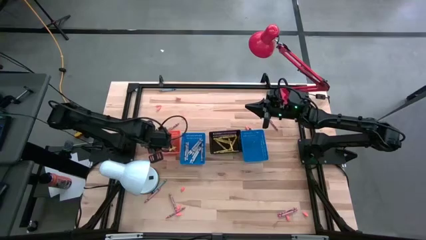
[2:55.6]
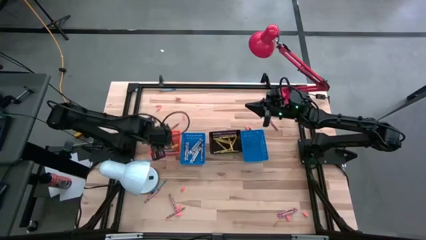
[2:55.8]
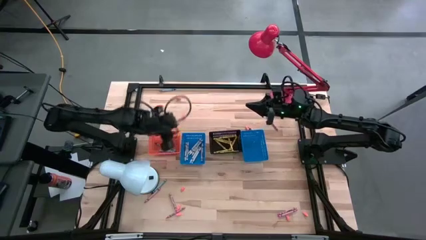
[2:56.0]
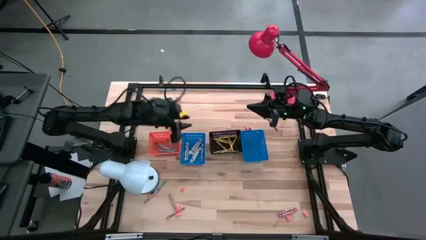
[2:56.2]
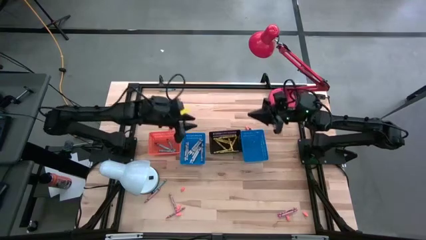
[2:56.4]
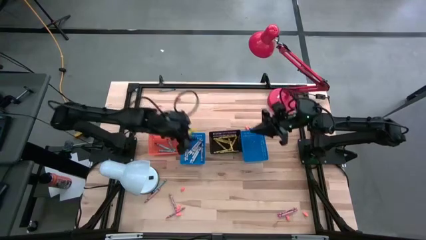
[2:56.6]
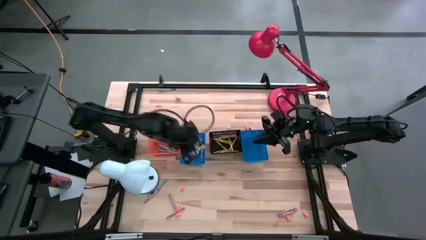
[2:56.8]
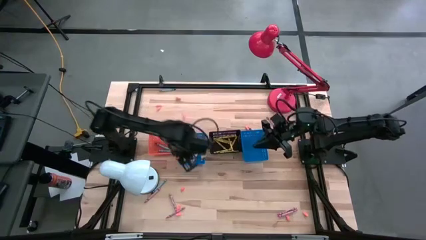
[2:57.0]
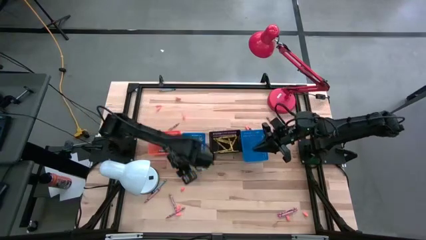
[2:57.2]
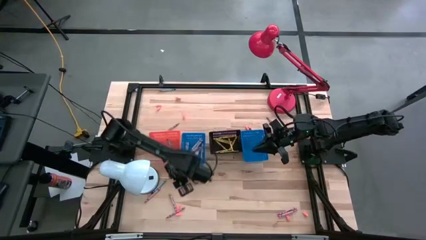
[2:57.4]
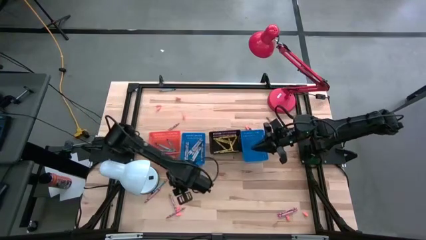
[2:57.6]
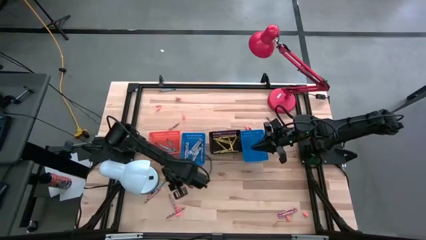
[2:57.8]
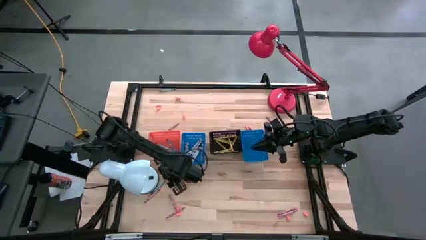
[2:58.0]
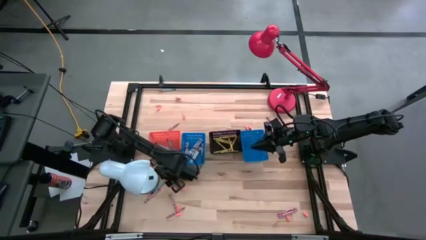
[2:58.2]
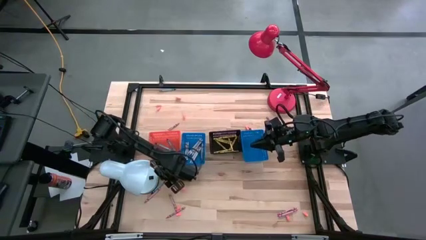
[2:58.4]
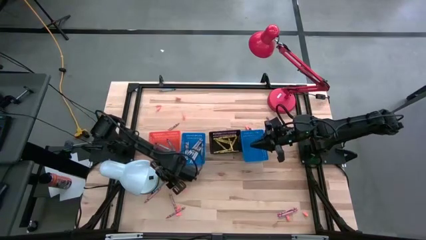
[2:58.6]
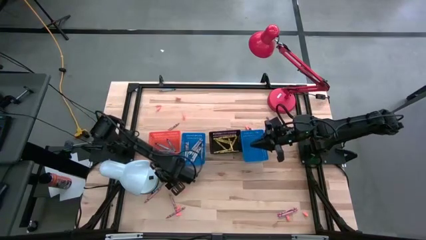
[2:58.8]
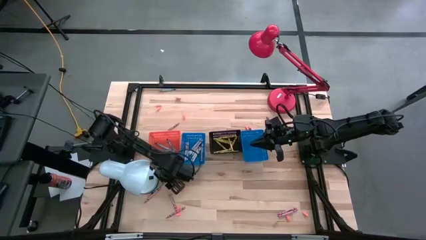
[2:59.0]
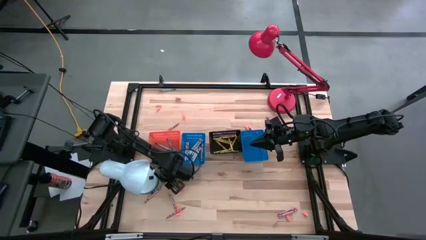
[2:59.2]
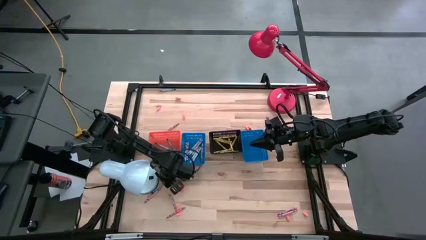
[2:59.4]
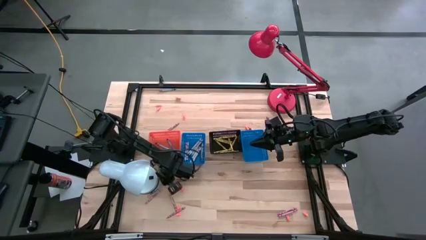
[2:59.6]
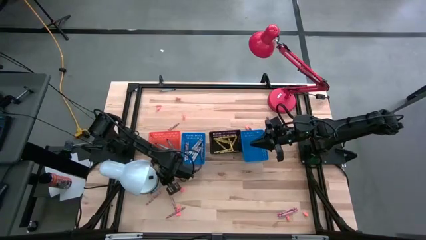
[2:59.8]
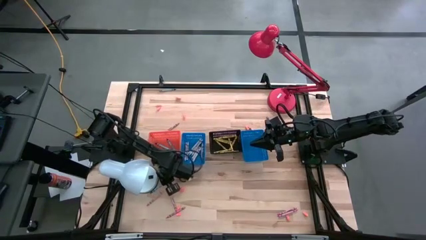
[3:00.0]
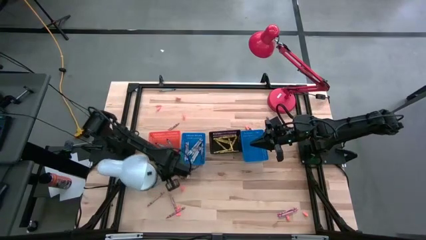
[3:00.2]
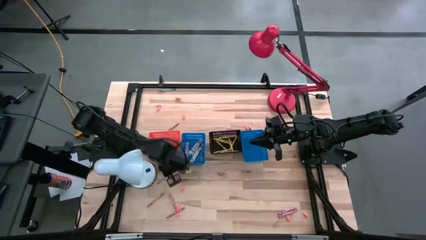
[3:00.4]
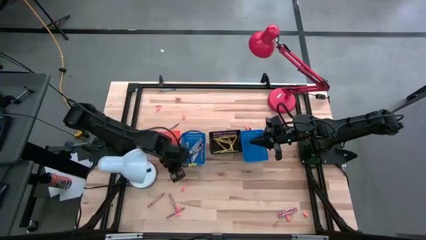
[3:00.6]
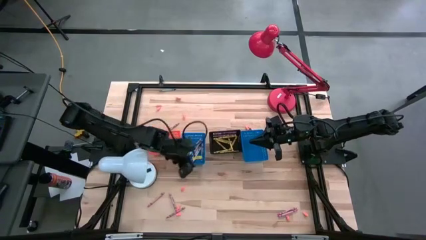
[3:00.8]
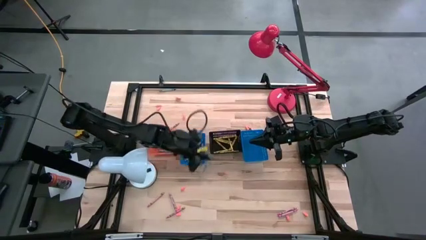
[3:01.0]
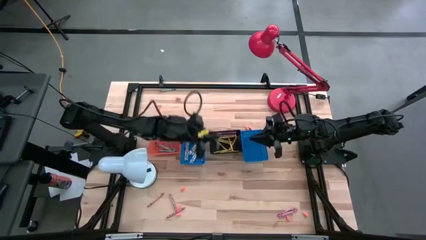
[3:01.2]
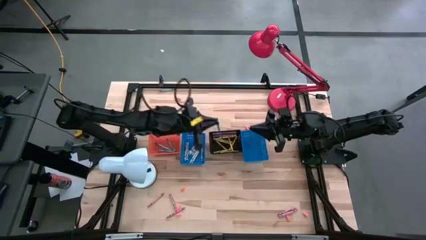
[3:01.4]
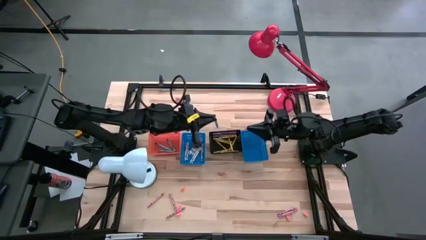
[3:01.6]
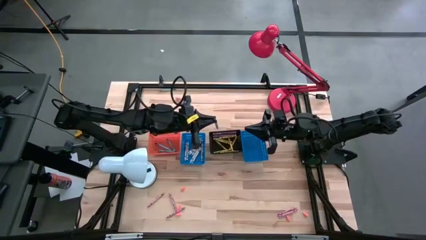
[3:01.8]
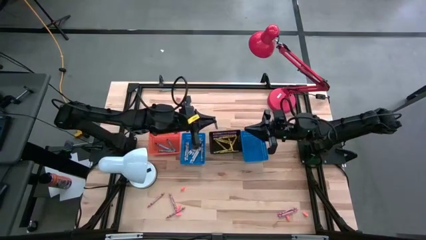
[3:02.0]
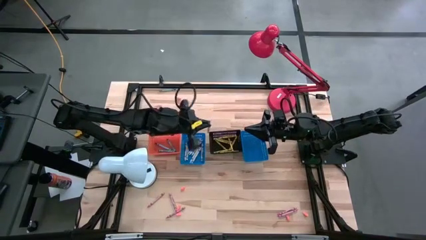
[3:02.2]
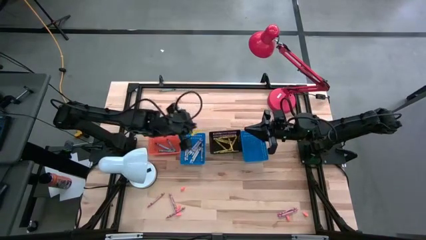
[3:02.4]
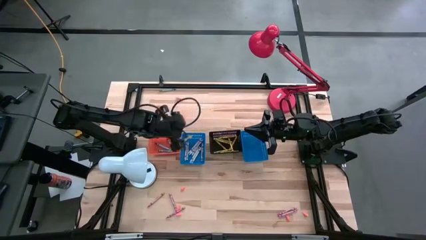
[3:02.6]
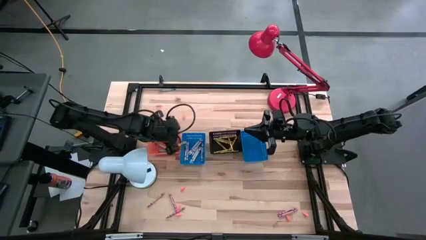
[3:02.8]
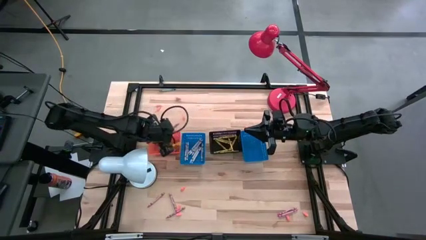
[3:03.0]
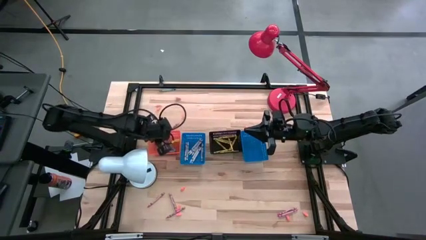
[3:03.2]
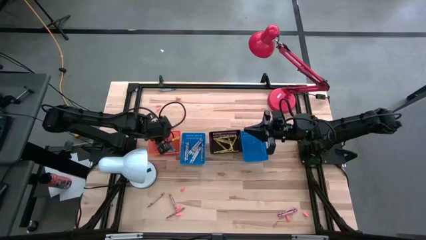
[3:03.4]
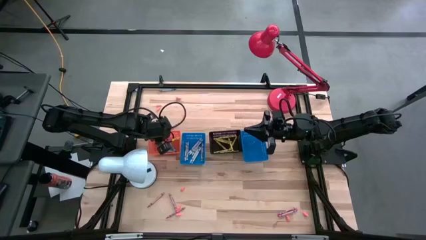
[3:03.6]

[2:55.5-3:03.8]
Task: Sort crayons
Put the blue crayon into the orange bin

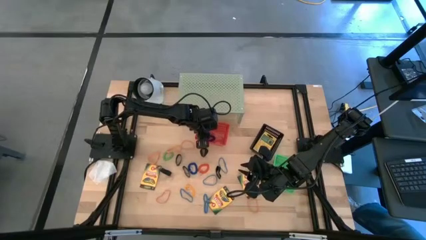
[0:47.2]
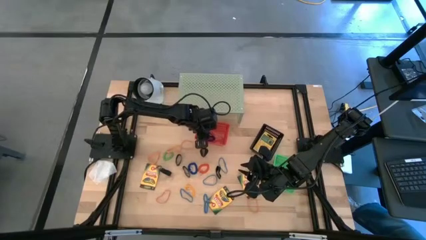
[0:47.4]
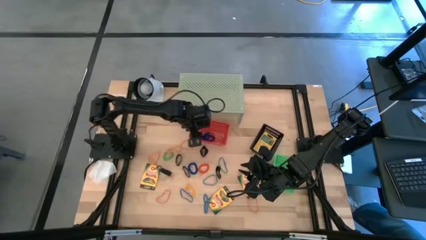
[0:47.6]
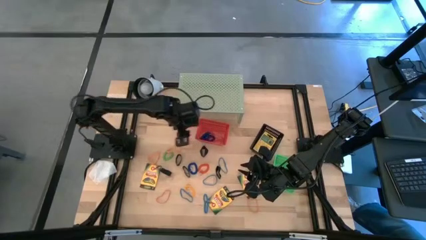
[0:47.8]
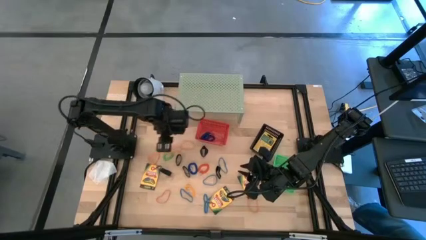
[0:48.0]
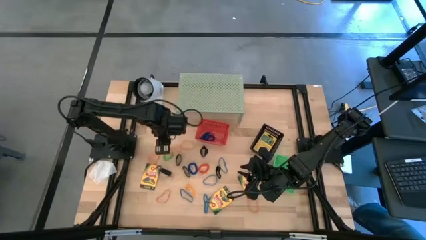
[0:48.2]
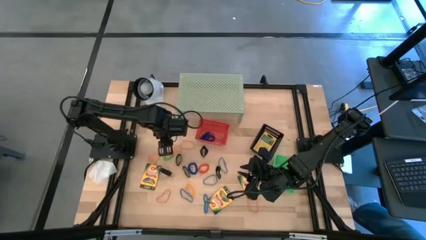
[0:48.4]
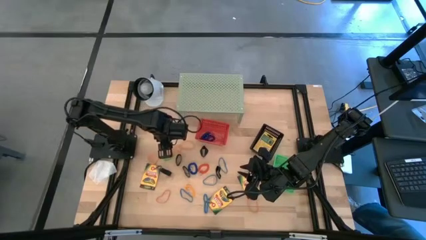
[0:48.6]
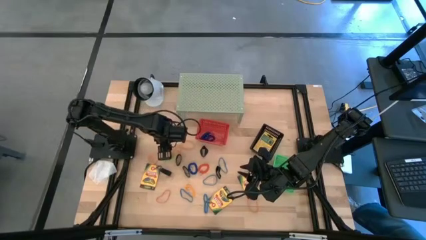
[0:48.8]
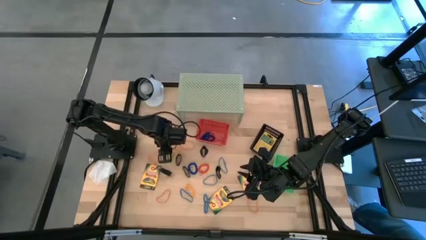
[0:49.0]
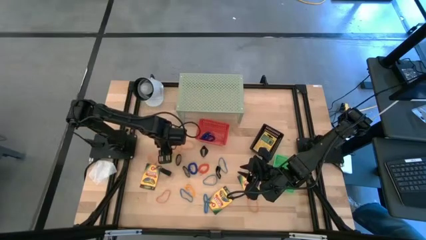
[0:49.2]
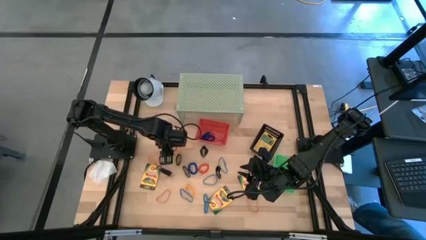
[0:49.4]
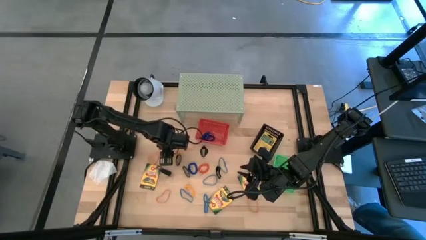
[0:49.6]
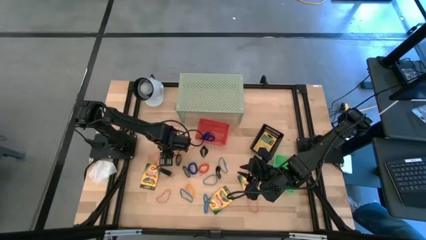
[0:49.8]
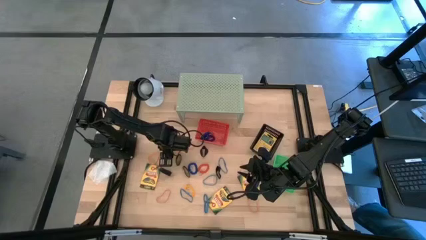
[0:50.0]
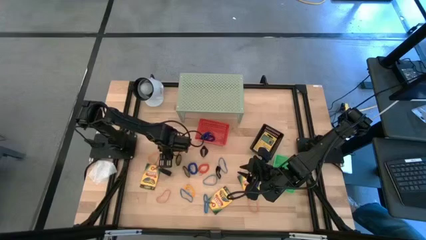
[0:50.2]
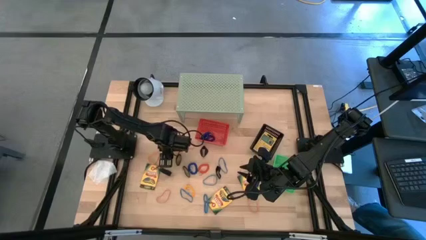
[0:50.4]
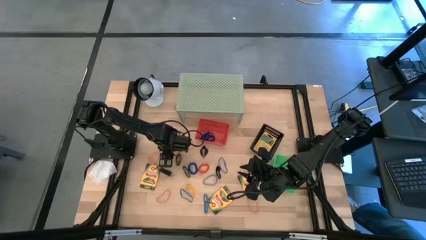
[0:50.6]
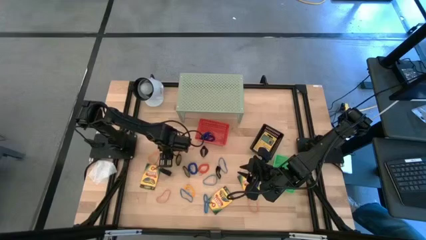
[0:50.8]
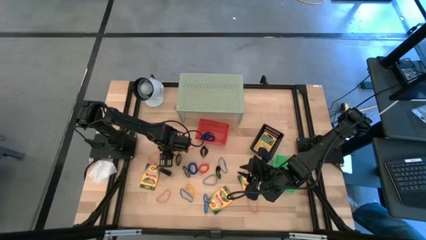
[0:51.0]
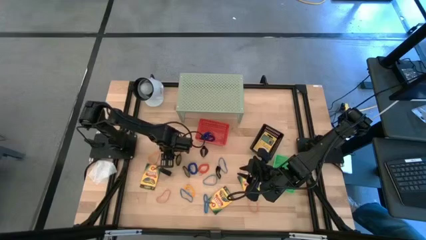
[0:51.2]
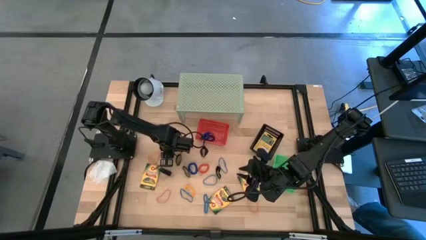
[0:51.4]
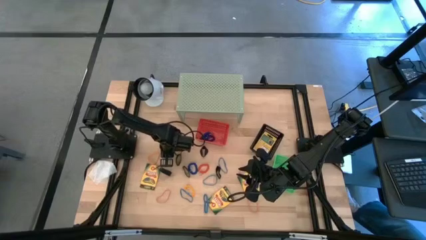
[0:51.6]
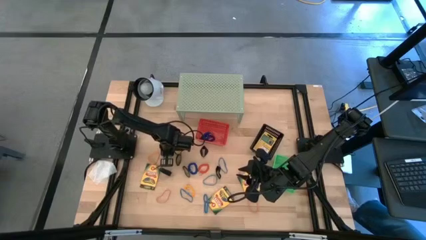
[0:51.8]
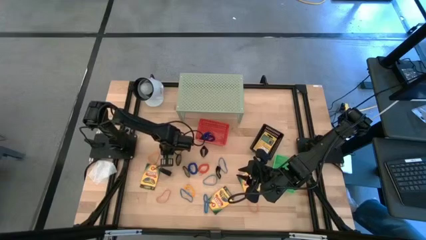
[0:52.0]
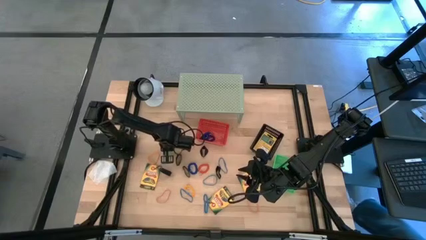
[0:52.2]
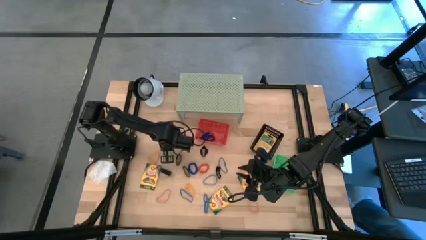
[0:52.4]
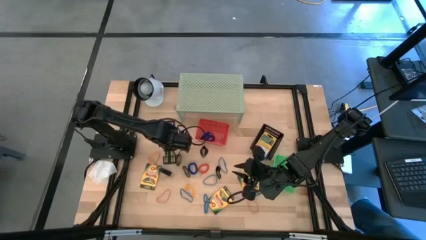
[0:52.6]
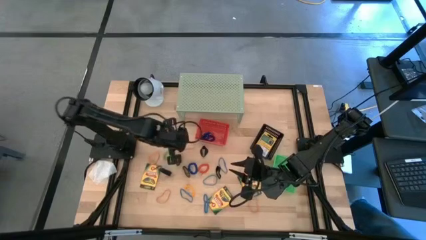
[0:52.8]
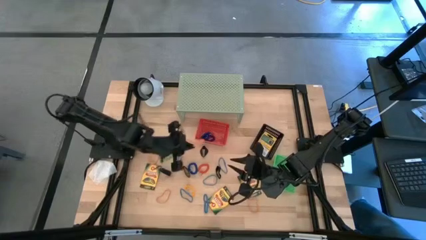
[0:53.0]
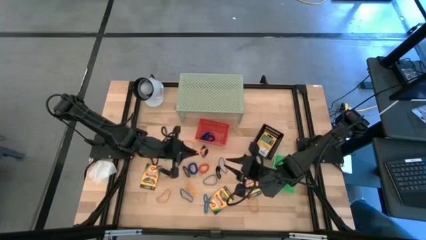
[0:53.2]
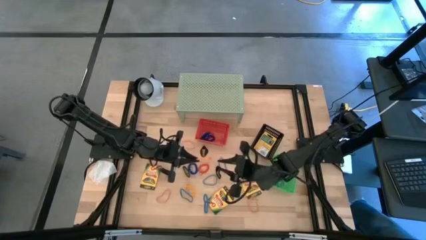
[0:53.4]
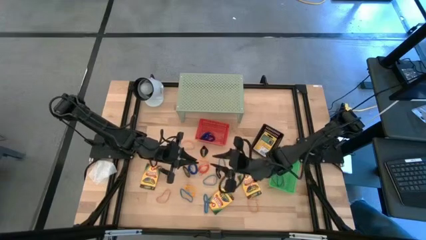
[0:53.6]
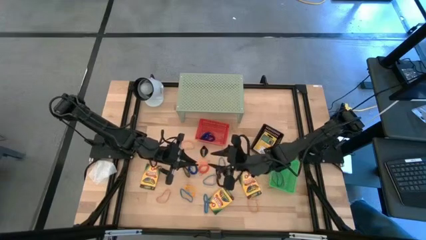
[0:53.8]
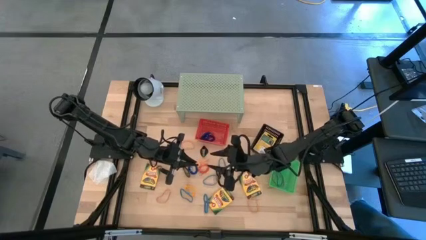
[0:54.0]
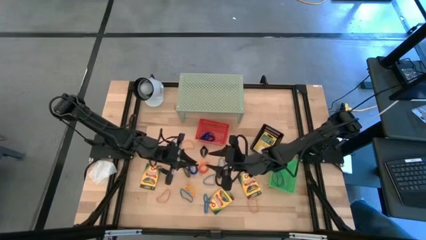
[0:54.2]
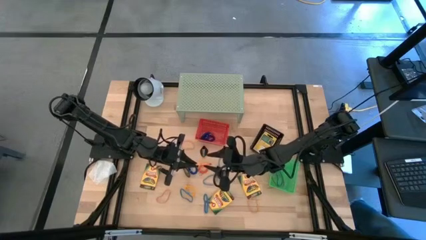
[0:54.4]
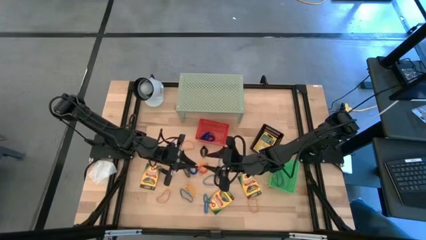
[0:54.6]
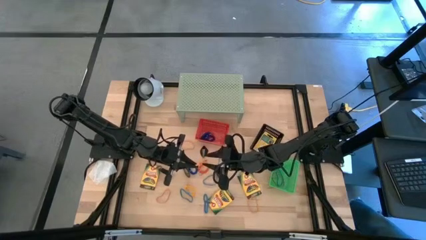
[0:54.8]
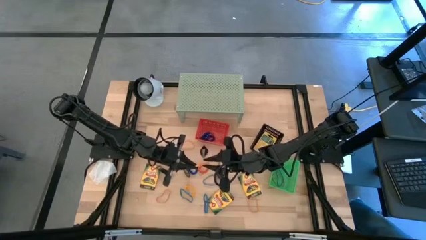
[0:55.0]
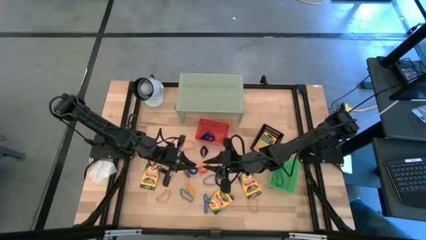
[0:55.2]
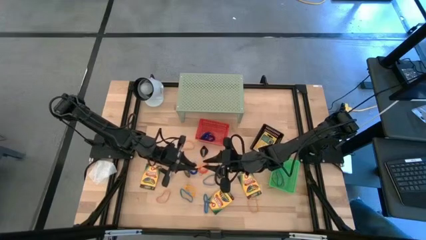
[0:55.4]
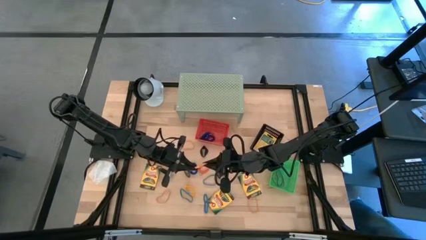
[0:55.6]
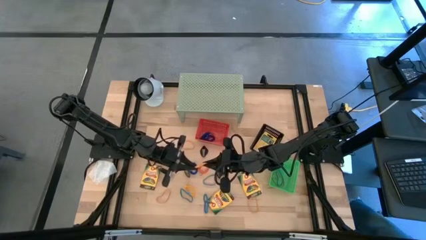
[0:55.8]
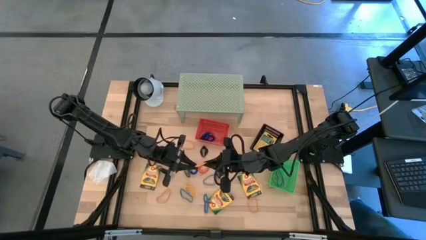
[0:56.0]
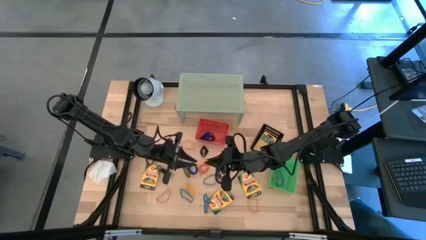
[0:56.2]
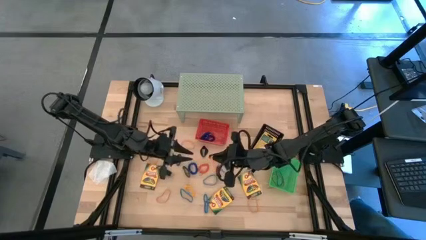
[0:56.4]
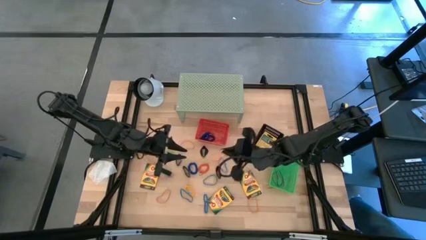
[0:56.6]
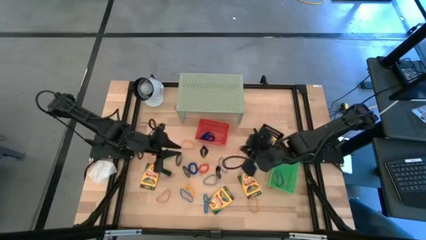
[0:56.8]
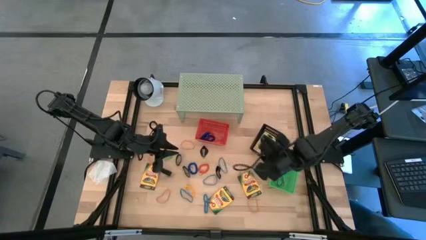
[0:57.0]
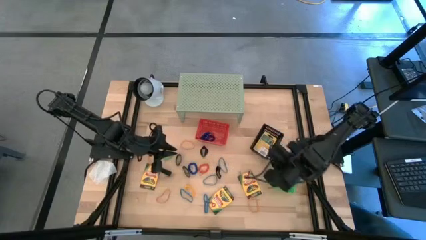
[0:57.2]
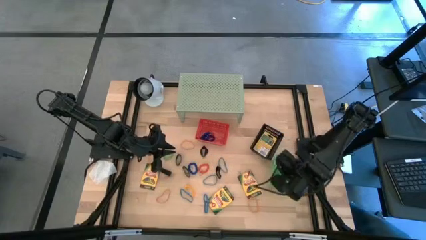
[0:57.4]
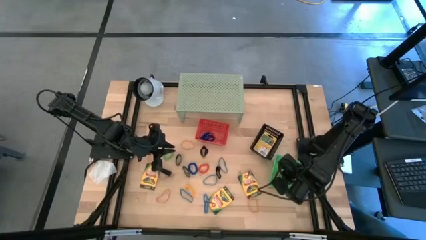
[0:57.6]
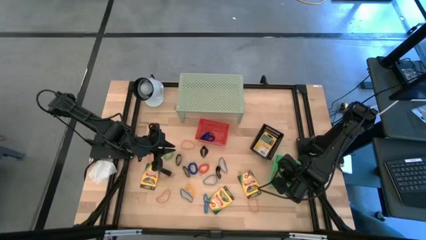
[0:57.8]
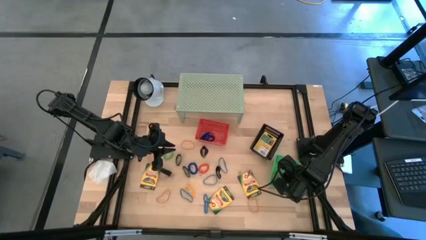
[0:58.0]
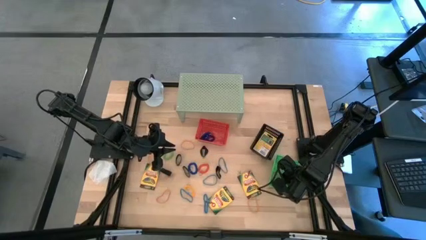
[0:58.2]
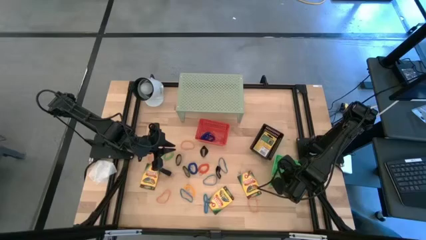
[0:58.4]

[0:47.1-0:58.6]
Task: Pick & Place Office Desk Supplies
Put the orange rubber band into the green bin
